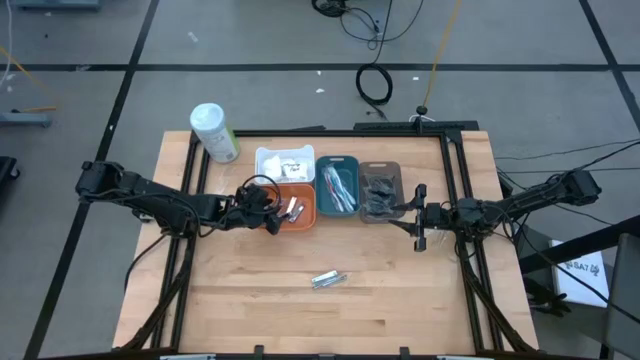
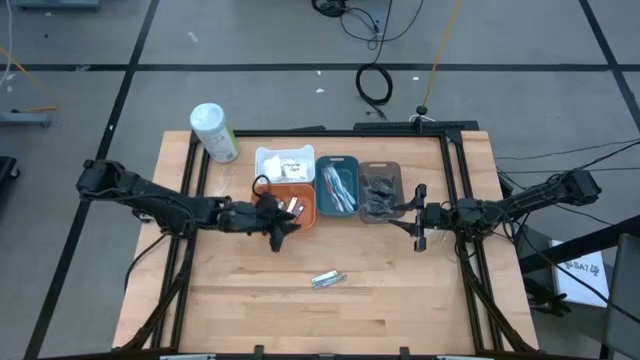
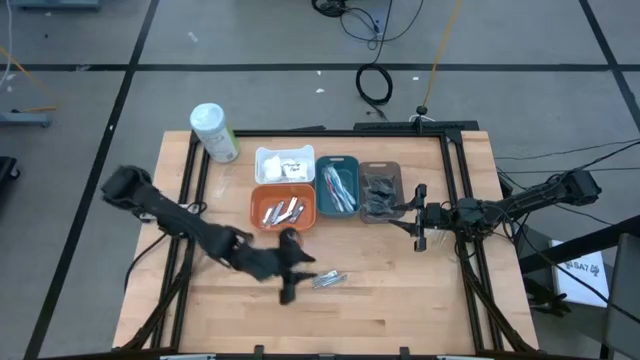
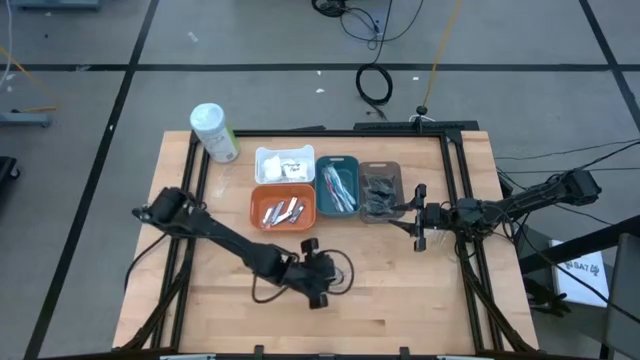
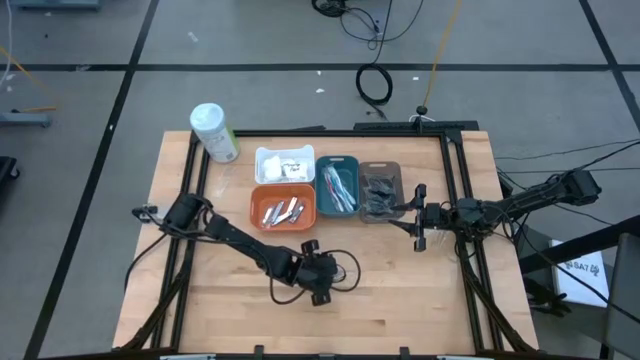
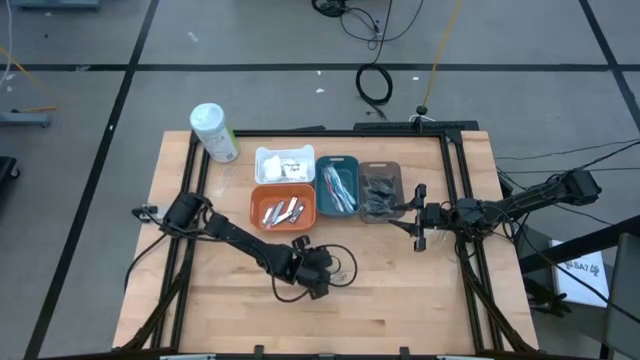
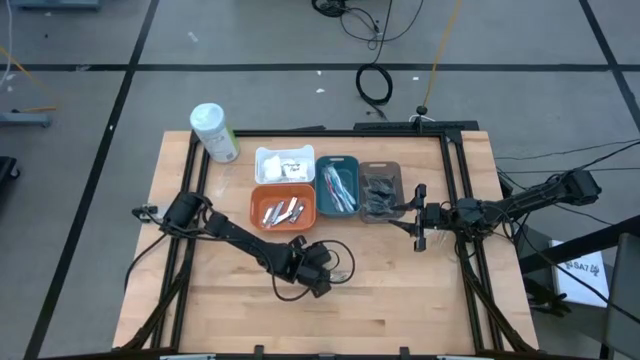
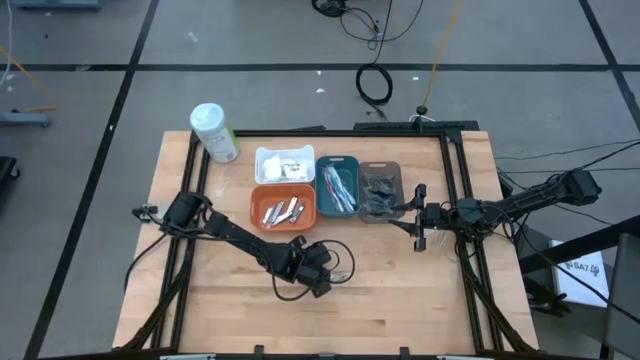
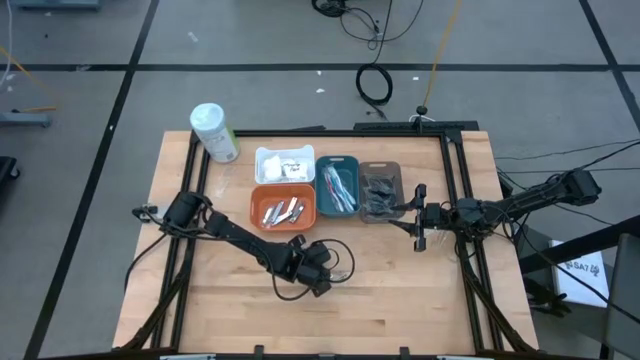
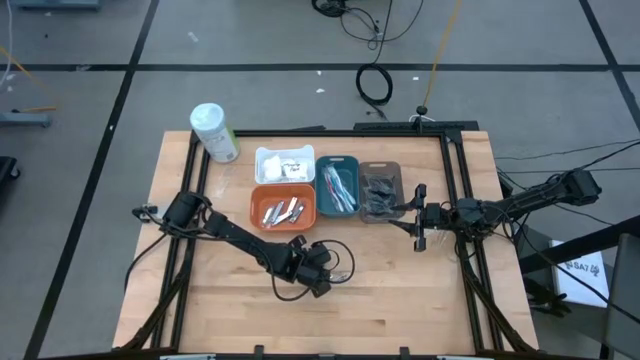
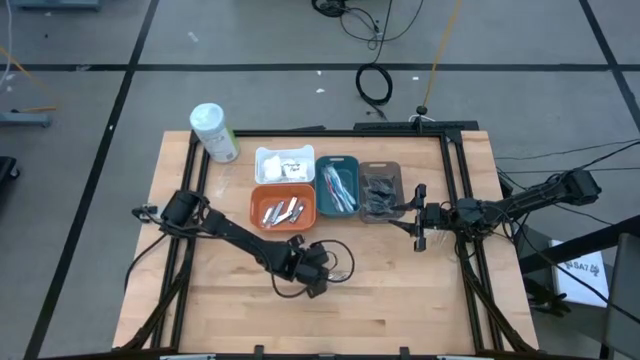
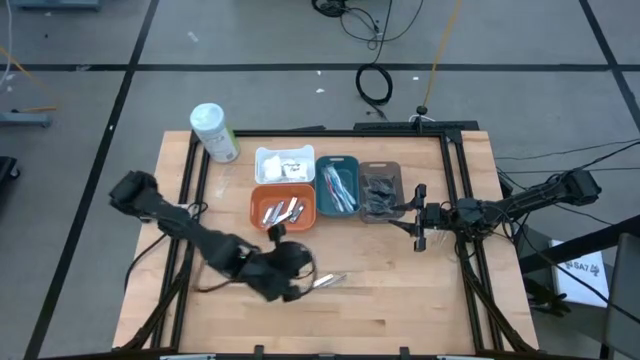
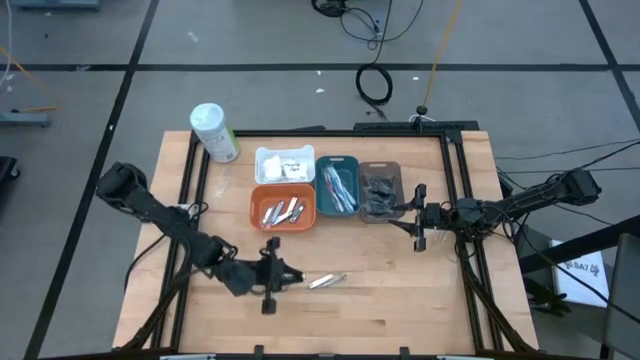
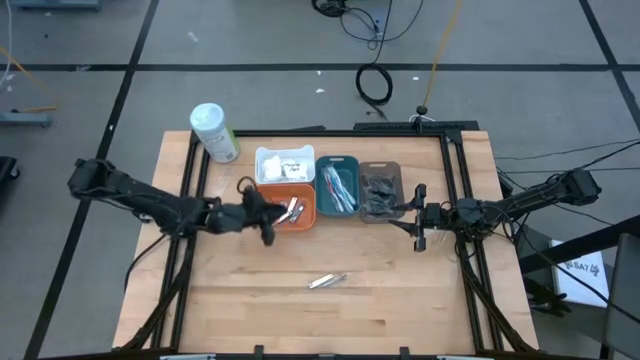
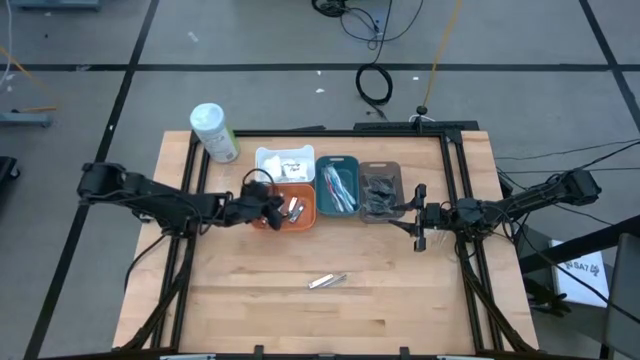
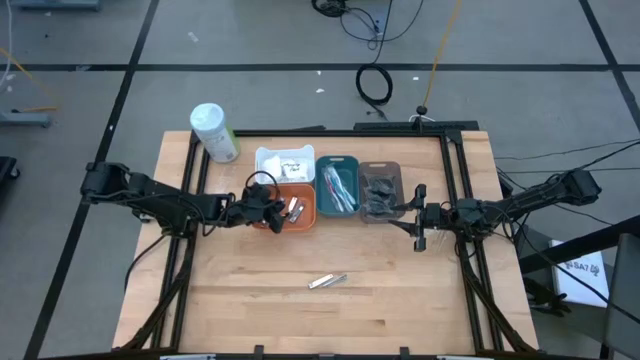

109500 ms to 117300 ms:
Task: Pick & Place Travel size toiletries
Put the nail cutter into the orange bin

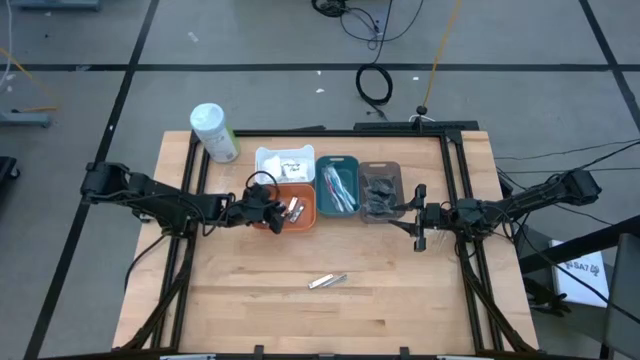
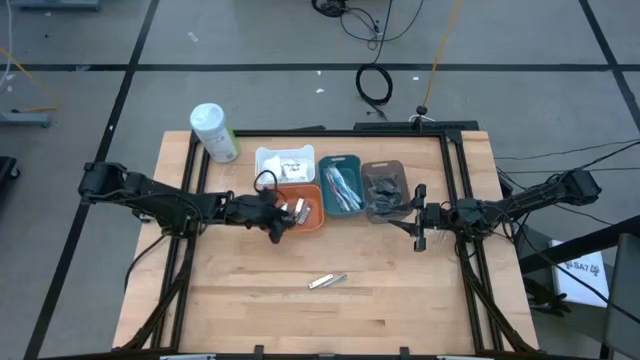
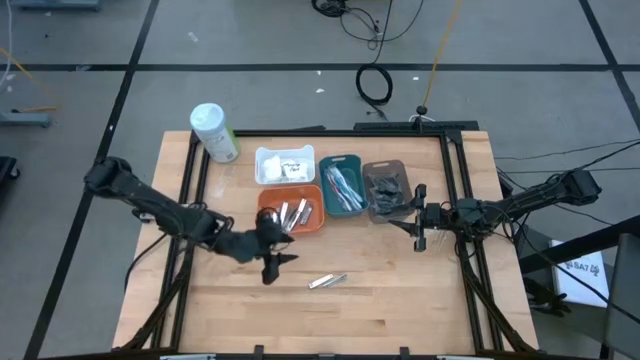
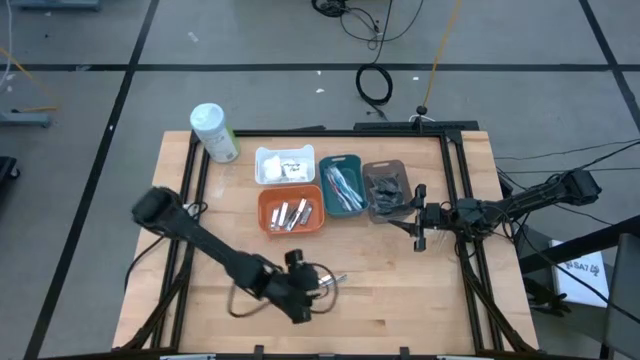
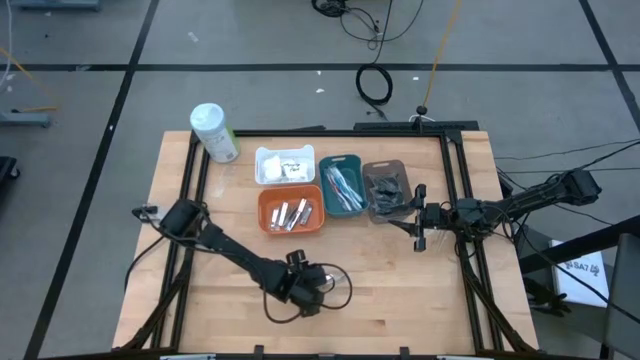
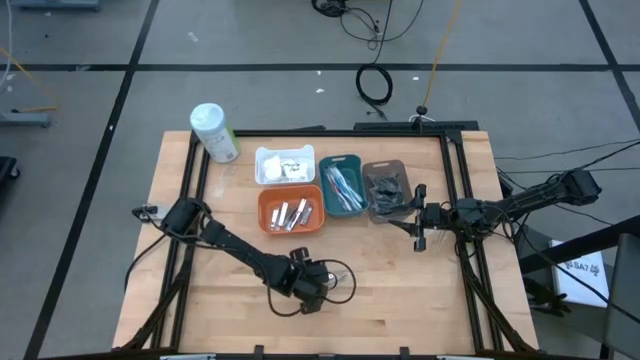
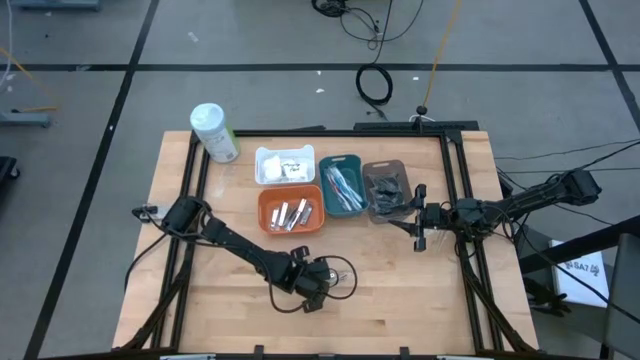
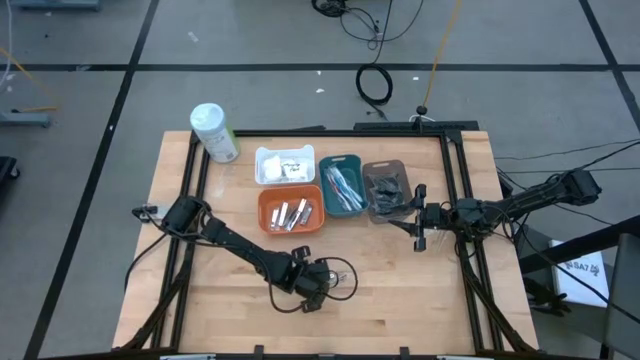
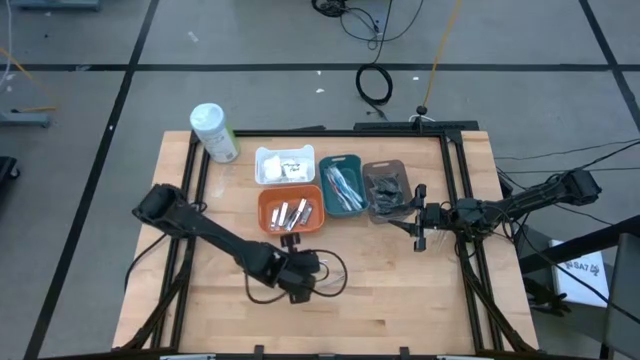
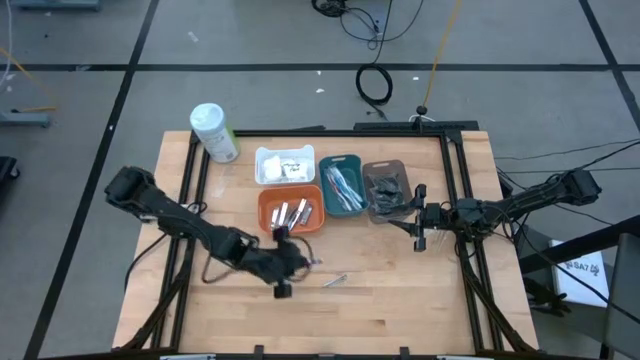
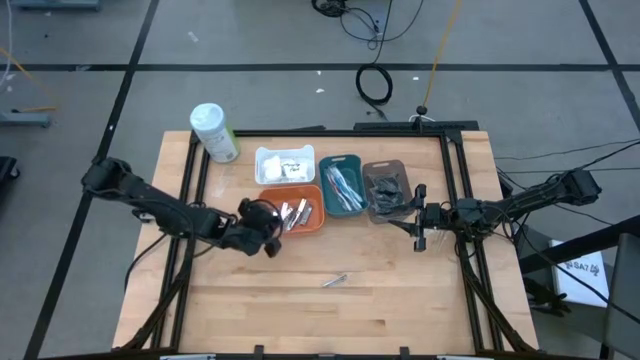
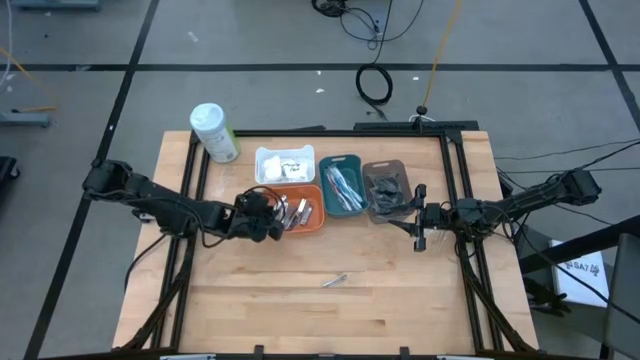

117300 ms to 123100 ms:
Put the nail cutter into the orange bin

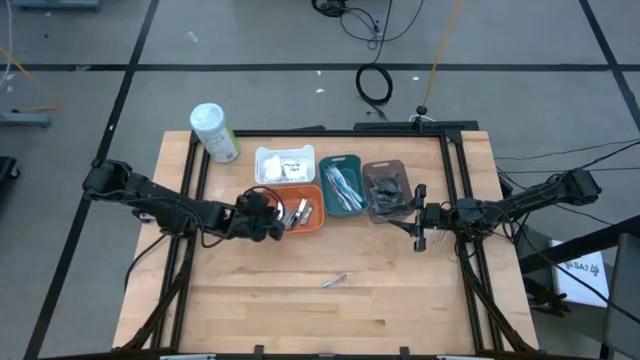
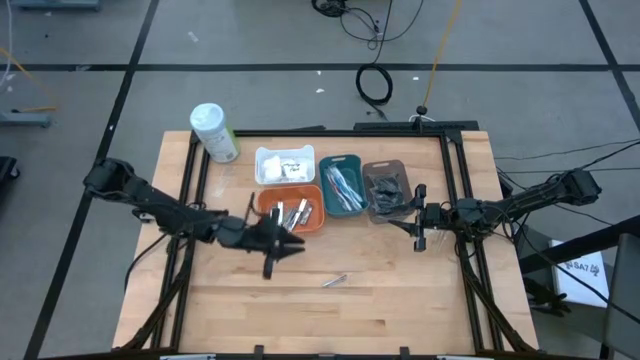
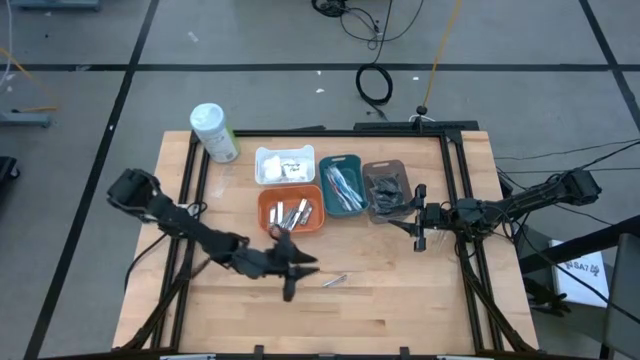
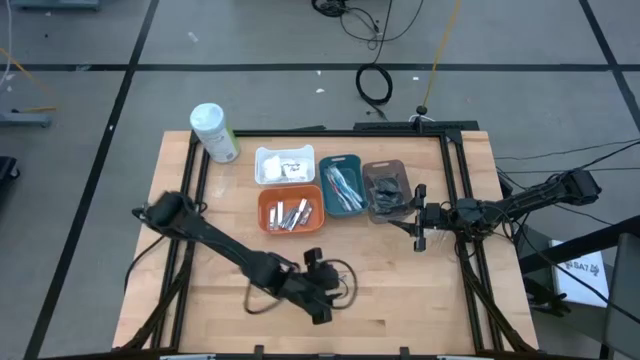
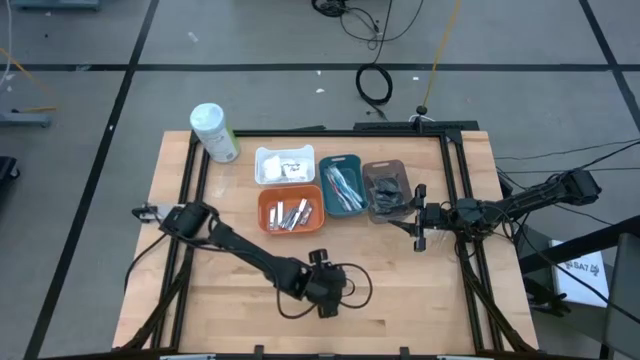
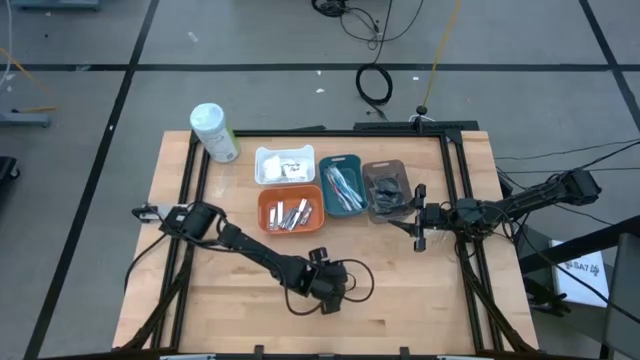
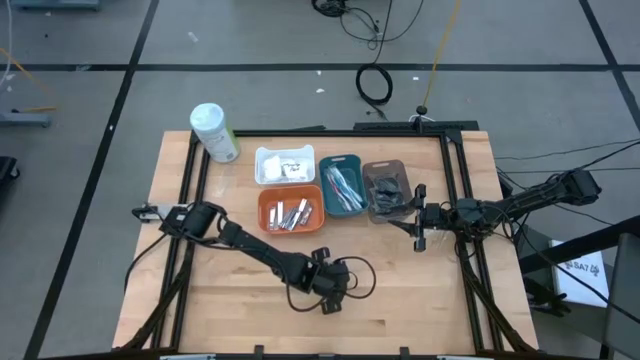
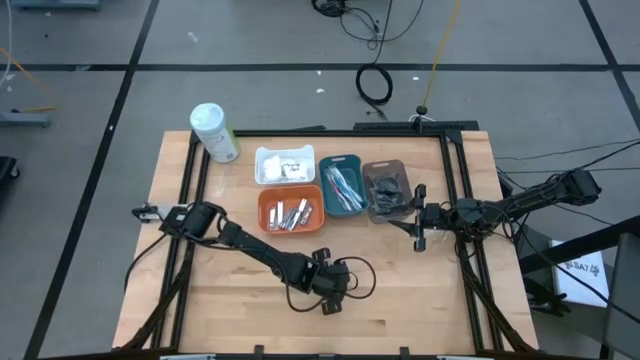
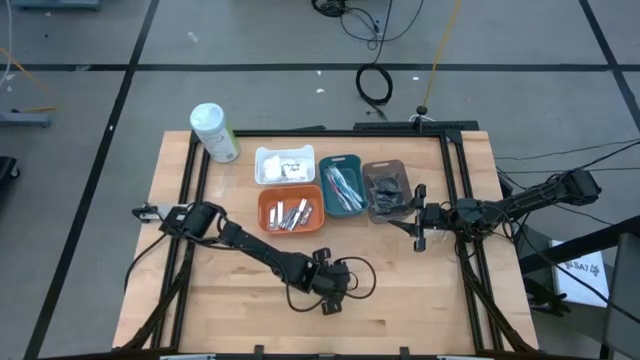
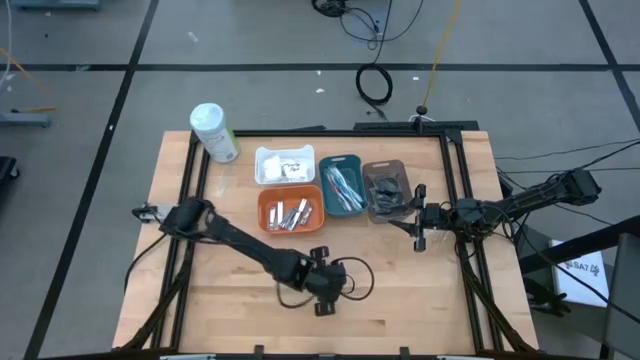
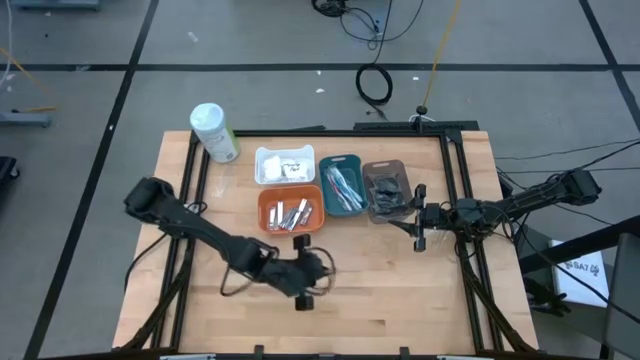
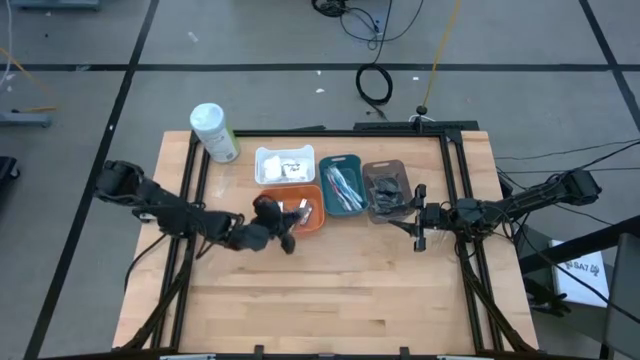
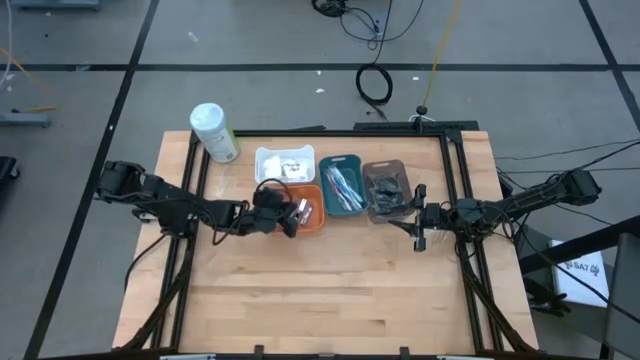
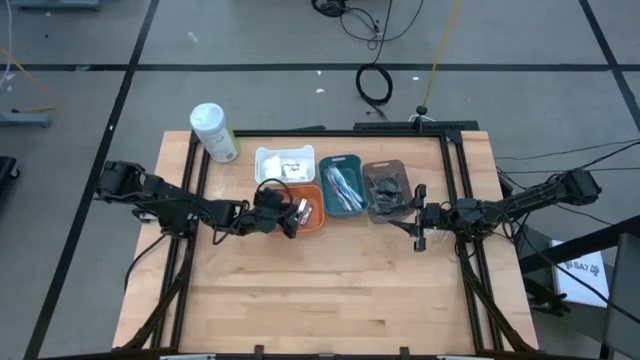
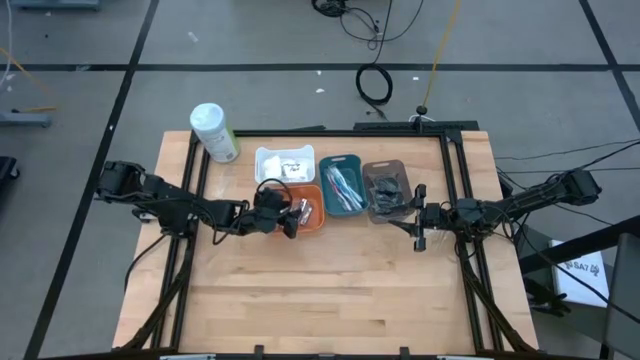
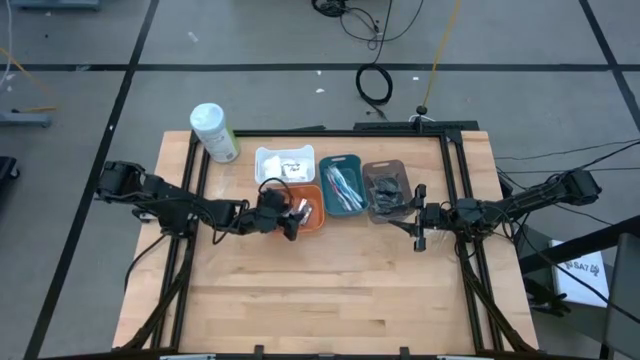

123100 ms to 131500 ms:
Put the nail cutter into the orange bin
